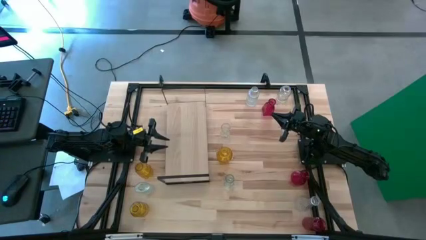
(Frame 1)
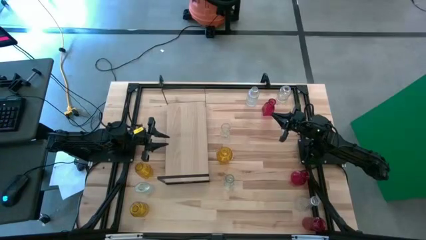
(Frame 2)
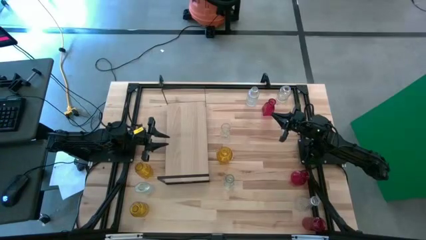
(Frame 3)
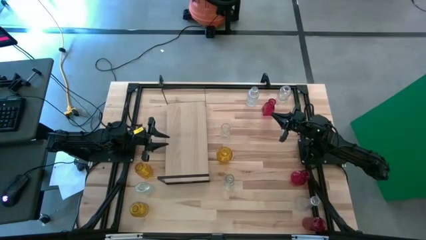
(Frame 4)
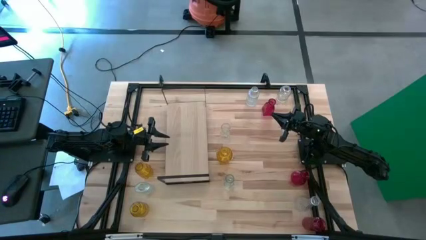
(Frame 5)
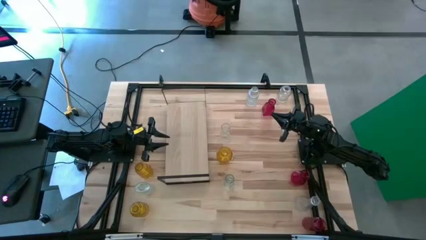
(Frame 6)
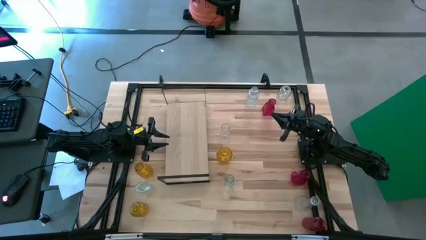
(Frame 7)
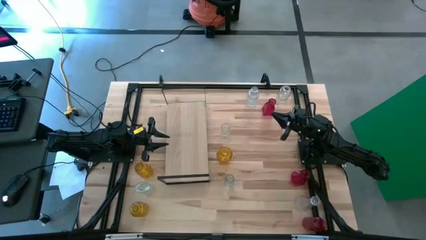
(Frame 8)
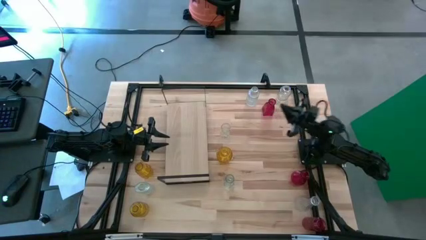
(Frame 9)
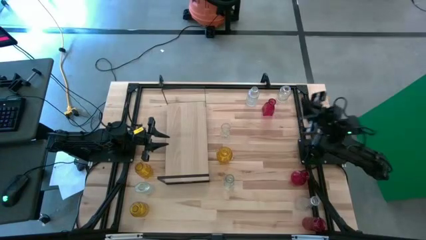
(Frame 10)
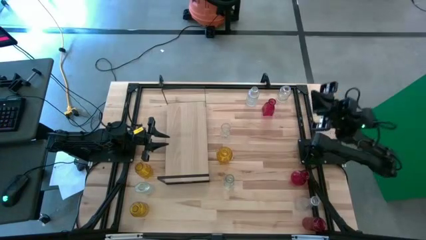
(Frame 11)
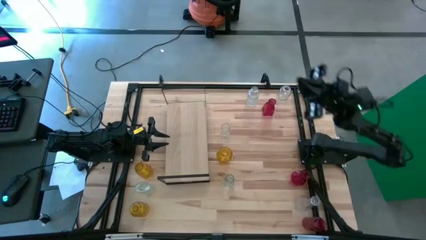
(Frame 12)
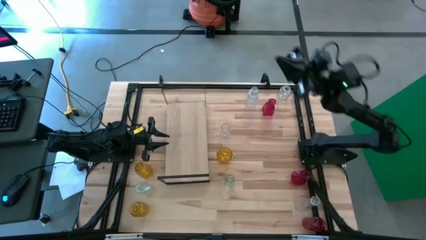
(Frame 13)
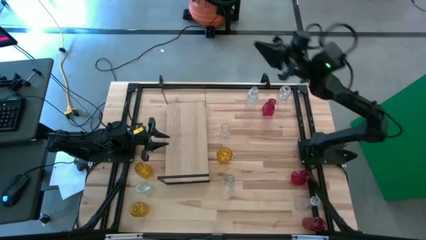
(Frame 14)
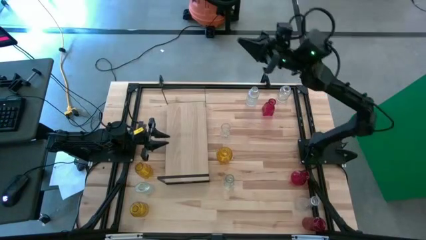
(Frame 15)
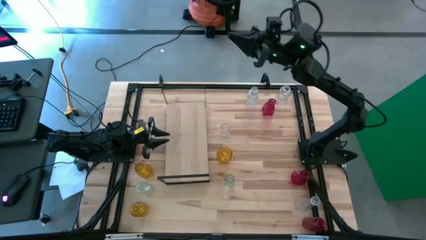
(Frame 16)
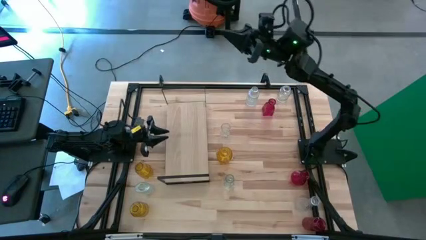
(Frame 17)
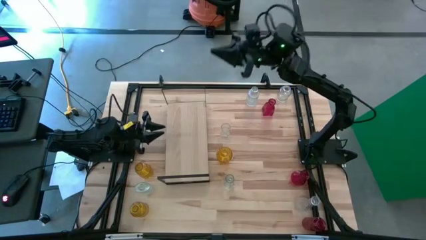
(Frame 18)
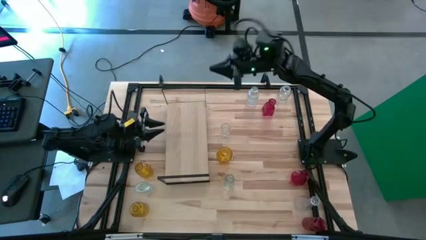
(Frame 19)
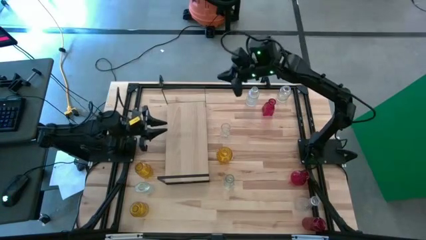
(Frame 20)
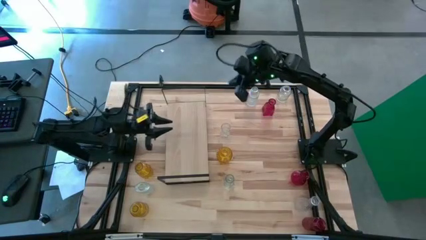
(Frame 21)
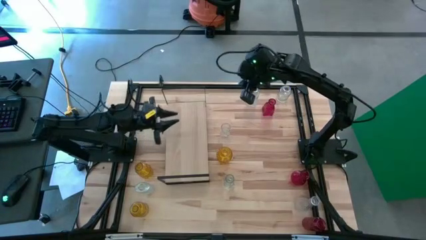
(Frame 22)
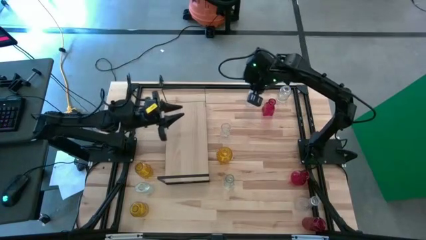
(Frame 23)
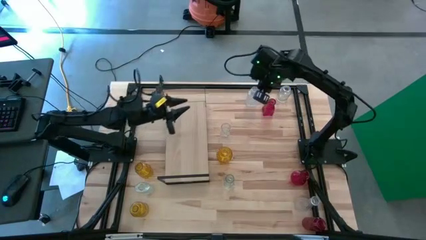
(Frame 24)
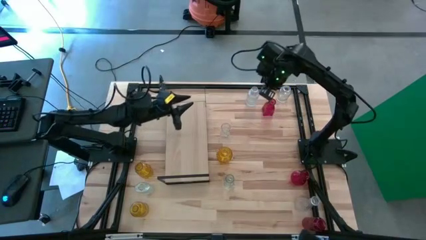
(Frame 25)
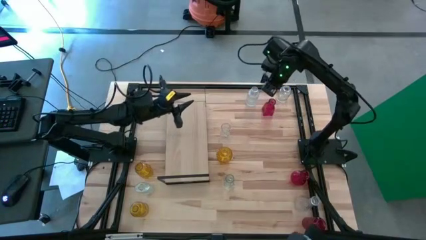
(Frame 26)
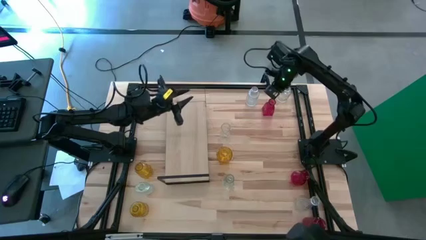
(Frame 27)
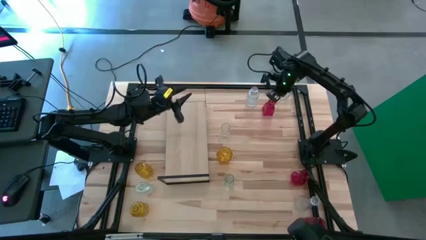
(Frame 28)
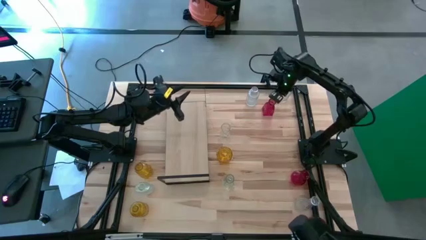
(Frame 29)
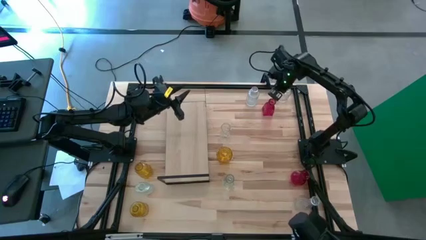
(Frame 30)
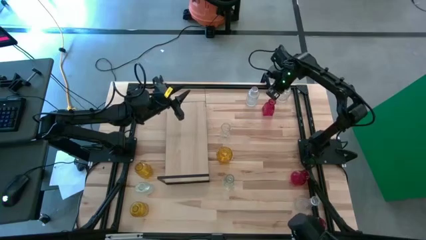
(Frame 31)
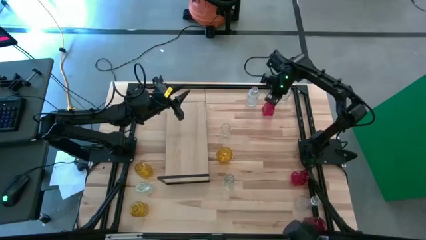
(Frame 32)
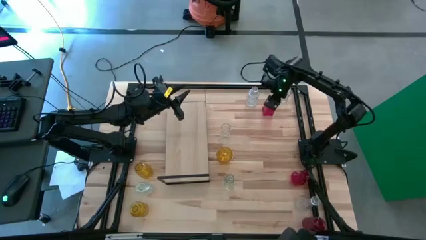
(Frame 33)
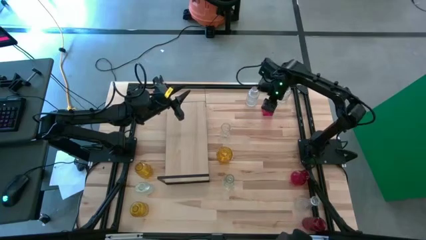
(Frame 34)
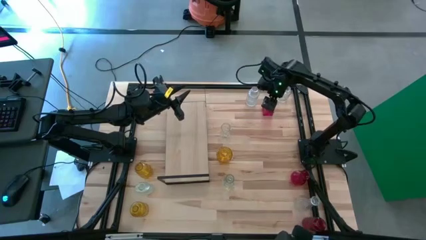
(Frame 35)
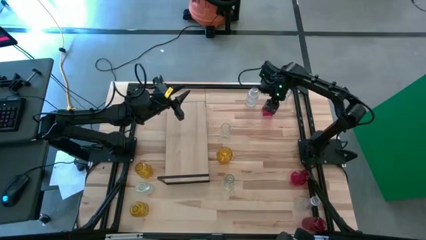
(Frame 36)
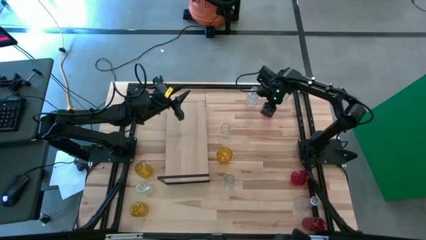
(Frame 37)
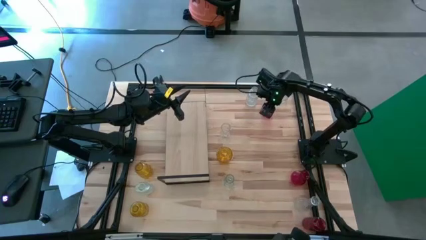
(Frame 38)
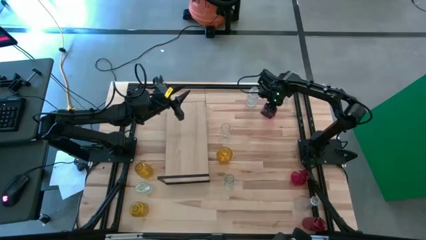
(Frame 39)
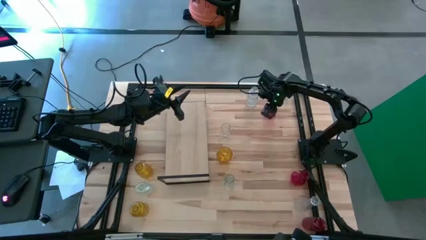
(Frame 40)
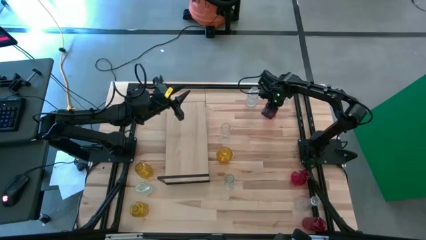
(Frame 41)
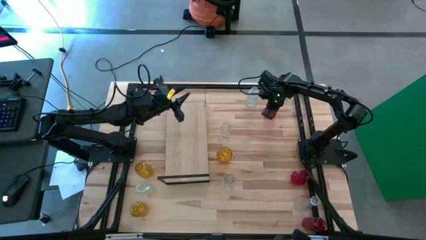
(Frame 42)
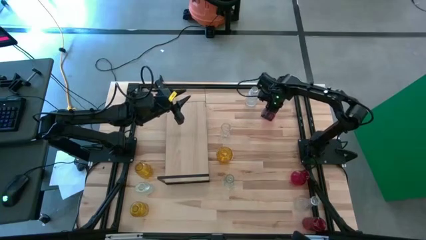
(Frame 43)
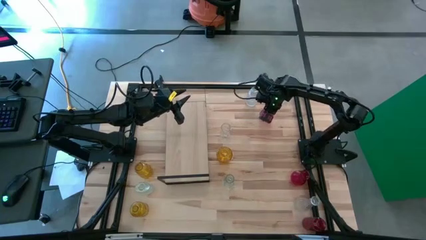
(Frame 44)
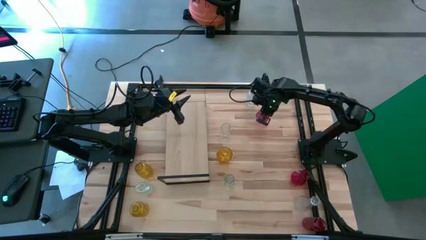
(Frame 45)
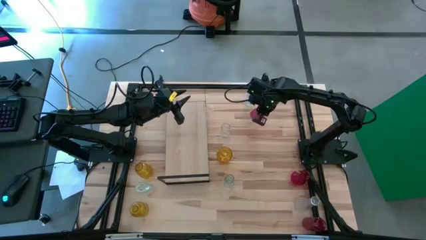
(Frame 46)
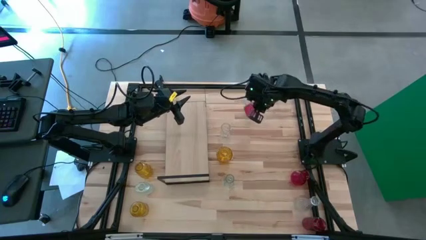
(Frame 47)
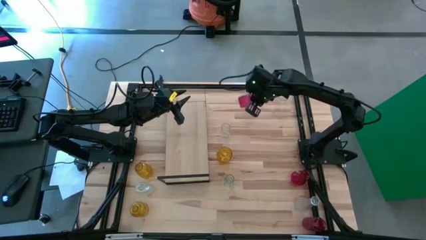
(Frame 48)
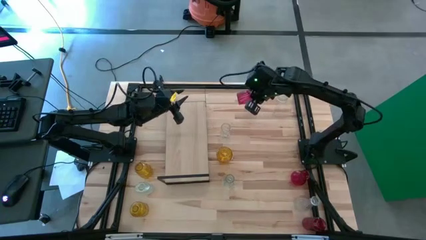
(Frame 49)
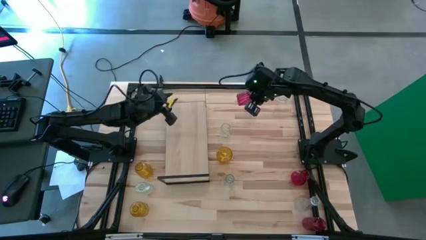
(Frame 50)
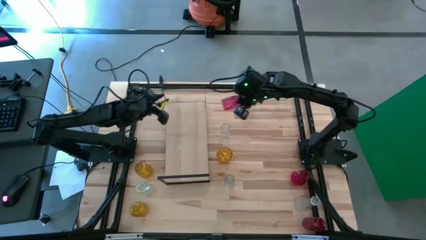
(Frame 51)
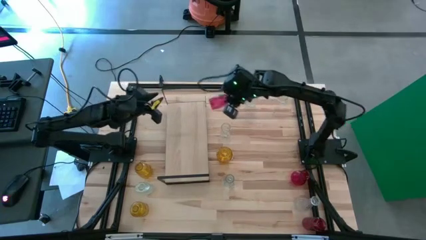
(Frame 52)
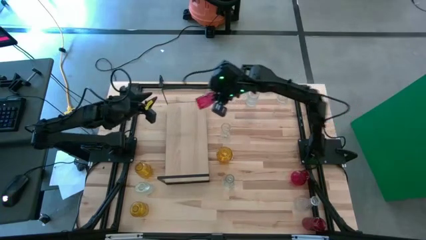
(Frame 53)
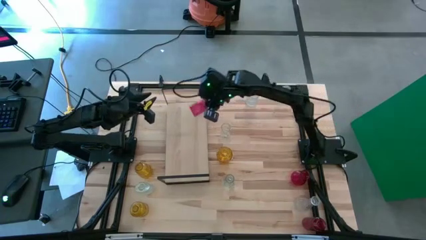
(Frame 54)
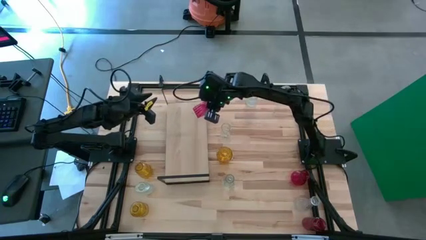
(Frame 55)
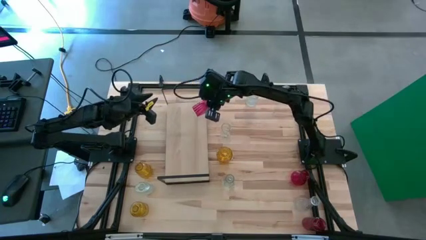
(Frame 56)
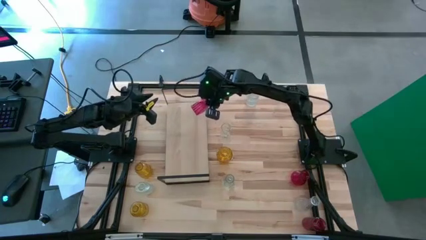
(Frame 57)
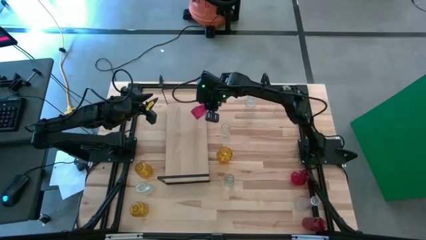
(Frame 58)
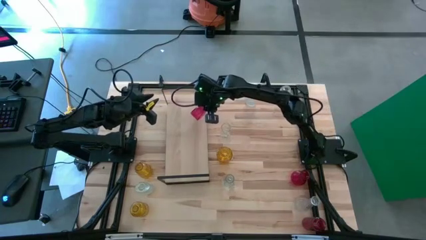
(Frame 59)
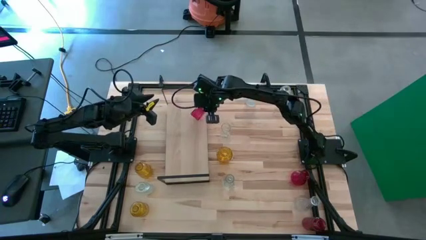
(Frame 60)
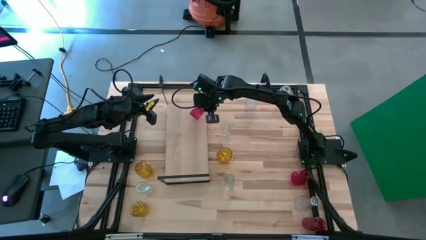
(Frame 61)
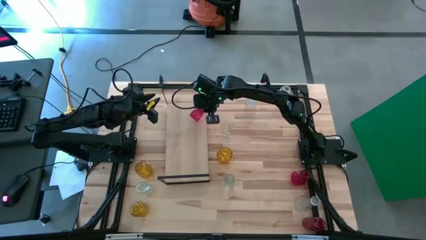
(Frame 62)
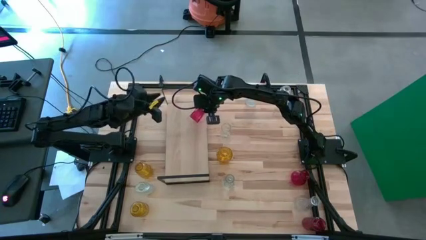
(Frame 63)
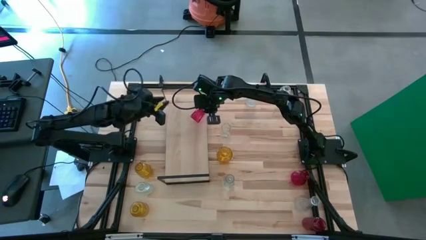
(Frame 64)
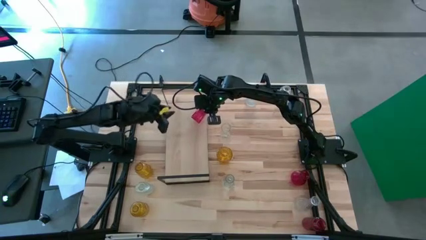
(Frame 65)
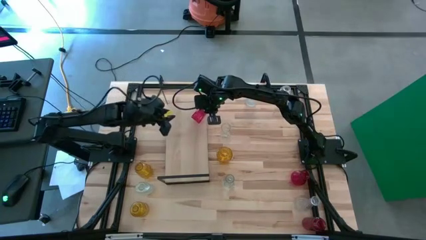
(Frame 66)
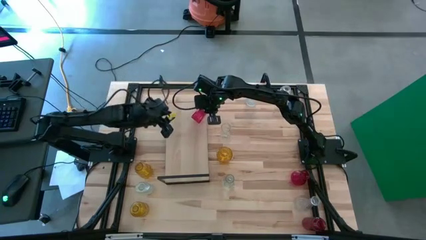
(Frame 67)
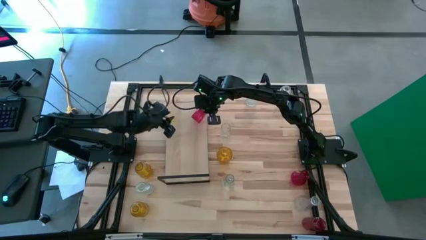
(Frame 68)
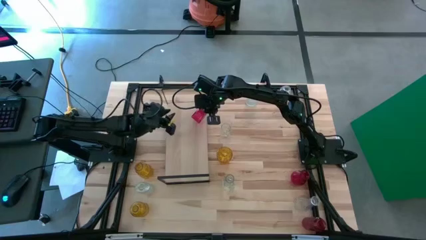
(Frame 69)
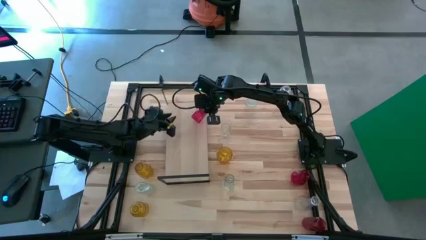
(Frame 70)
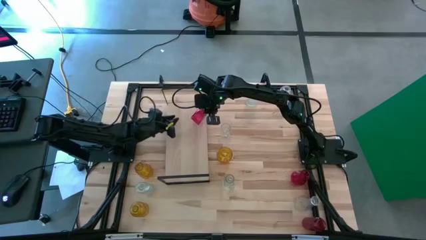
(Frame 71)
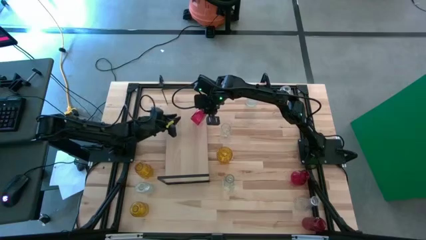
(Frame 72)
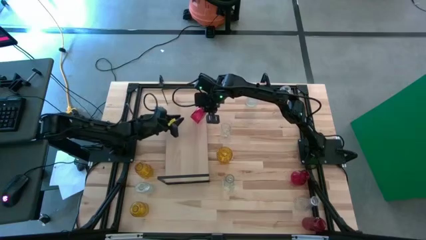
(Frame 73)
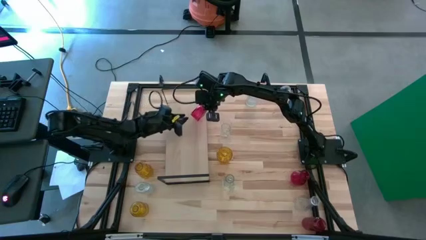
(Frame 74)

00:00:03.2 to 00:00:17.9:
Task: sort vases onto shelf
Put the top left red vase on the shelf
